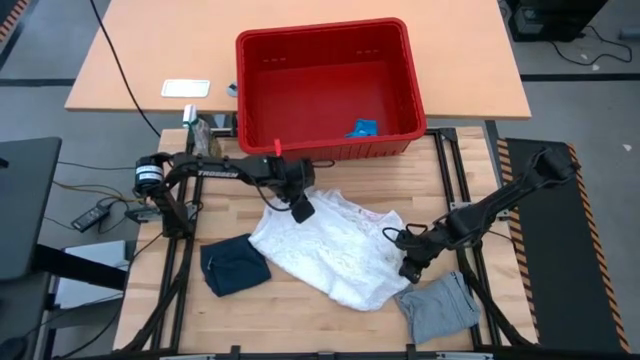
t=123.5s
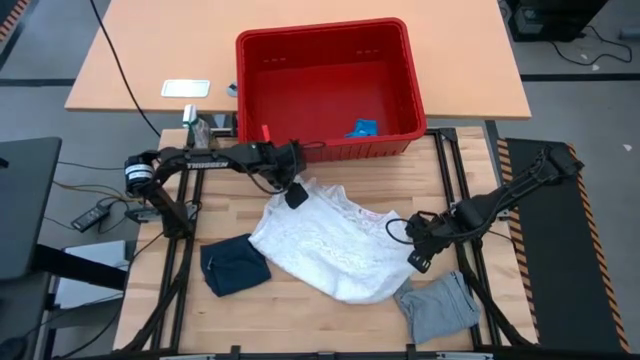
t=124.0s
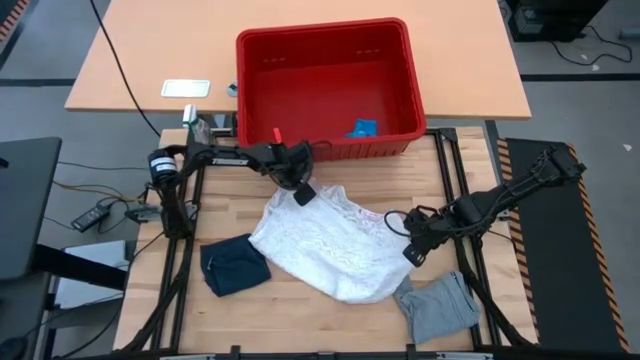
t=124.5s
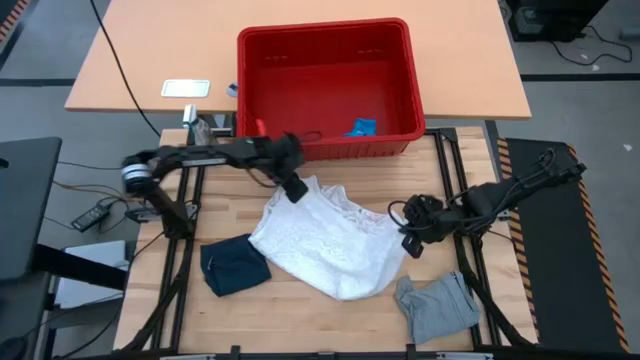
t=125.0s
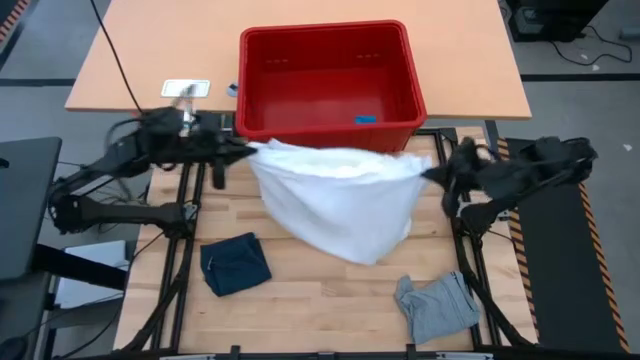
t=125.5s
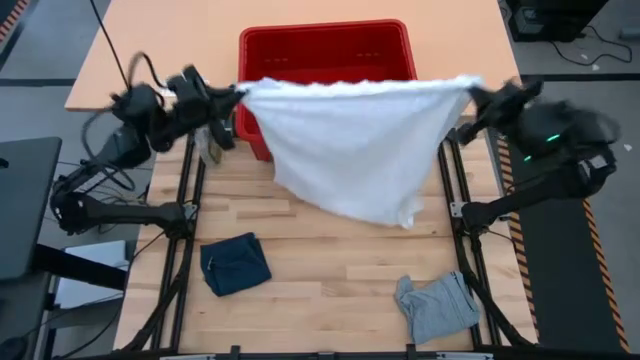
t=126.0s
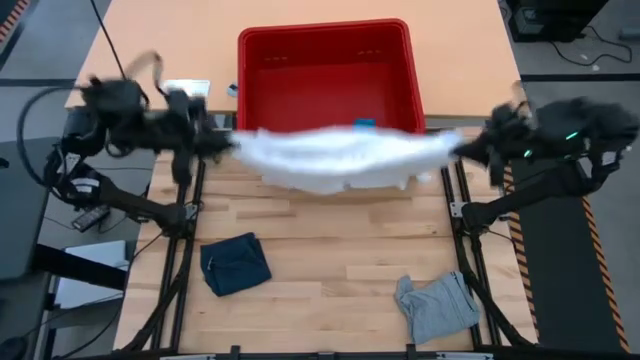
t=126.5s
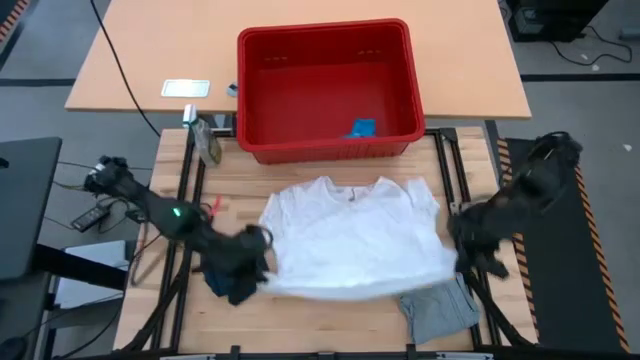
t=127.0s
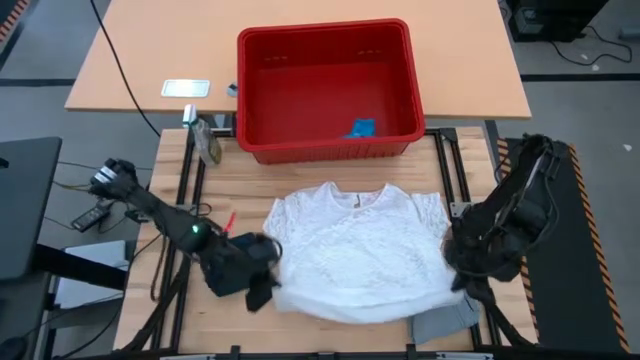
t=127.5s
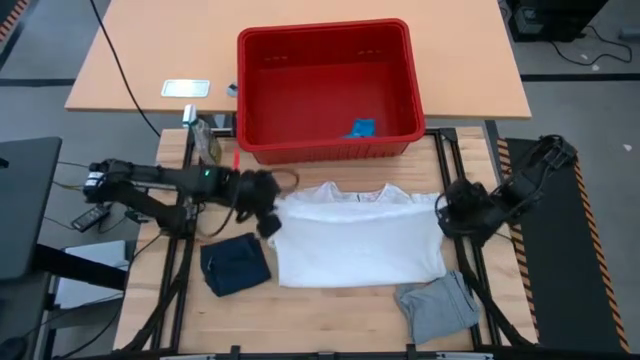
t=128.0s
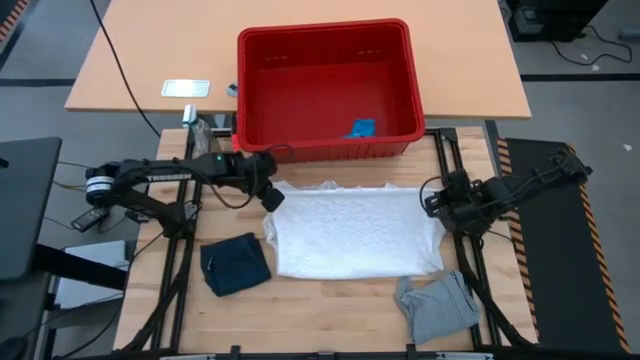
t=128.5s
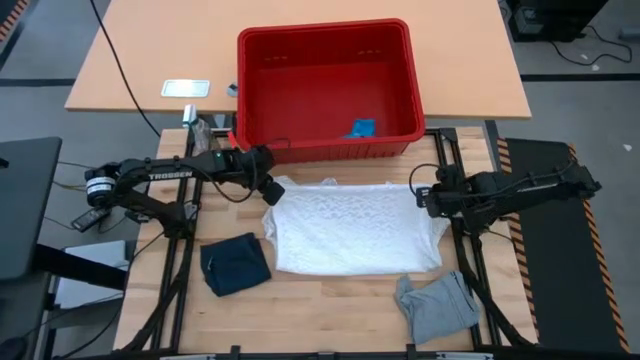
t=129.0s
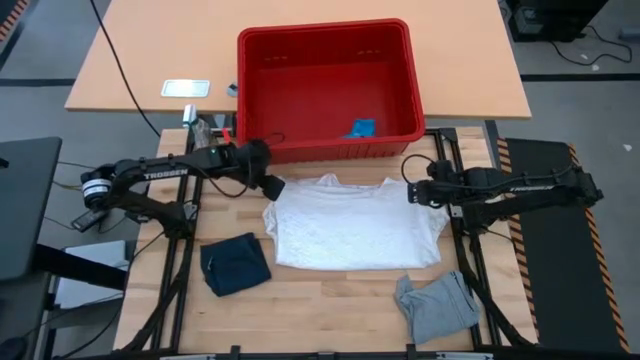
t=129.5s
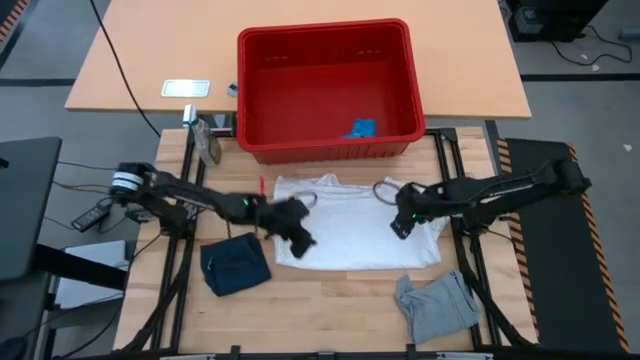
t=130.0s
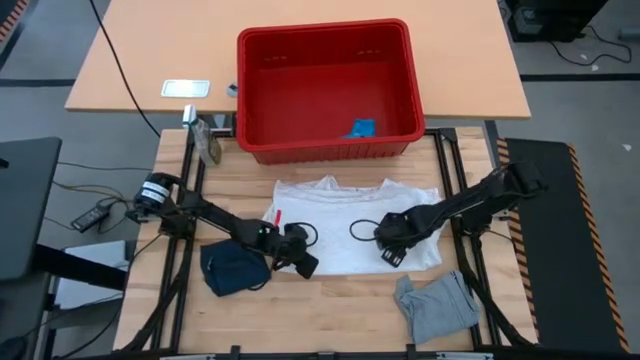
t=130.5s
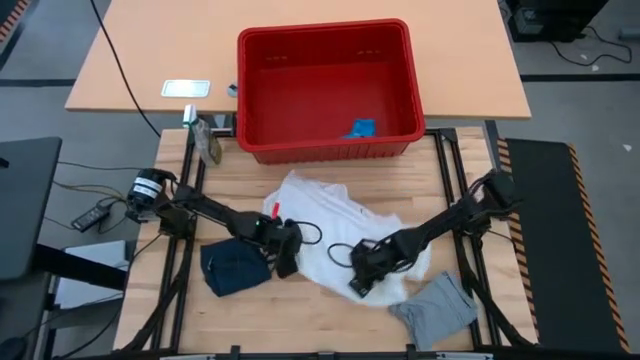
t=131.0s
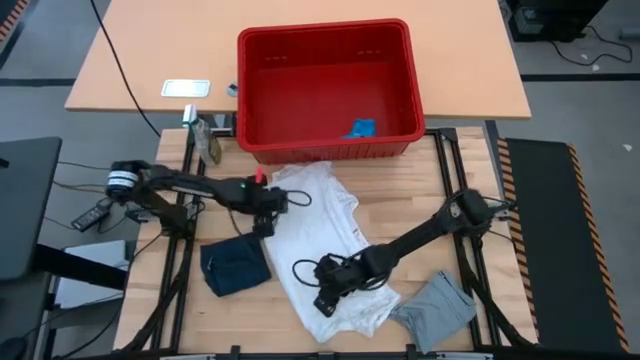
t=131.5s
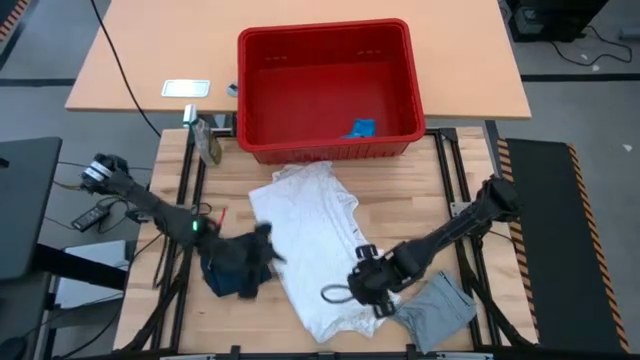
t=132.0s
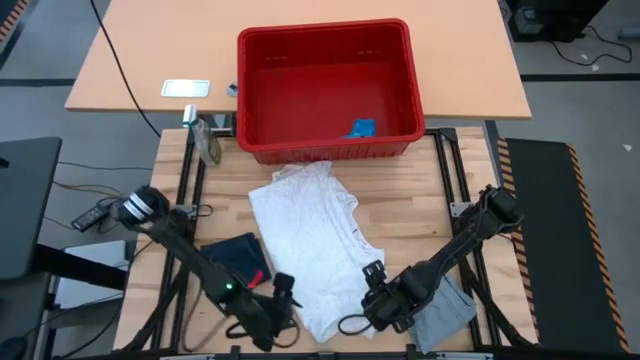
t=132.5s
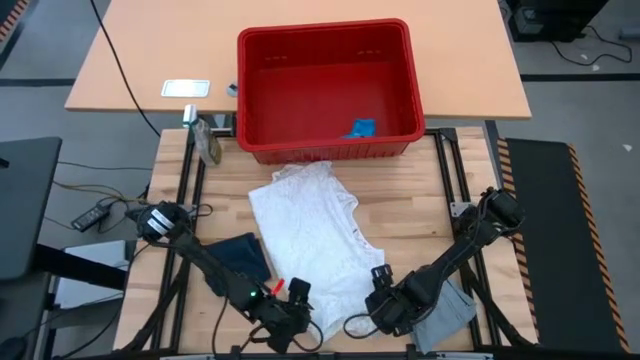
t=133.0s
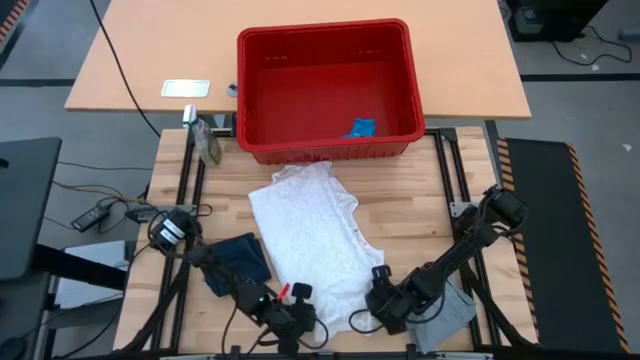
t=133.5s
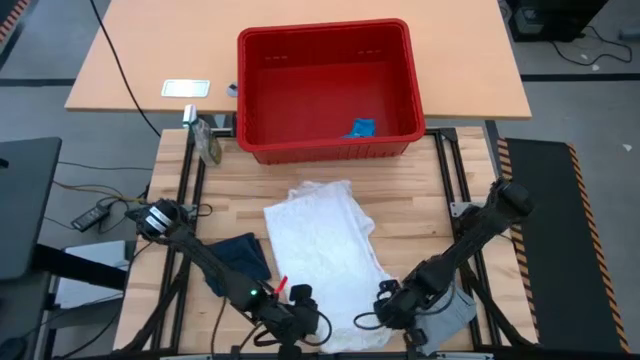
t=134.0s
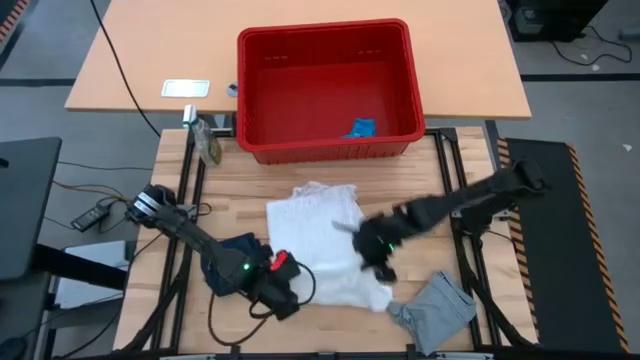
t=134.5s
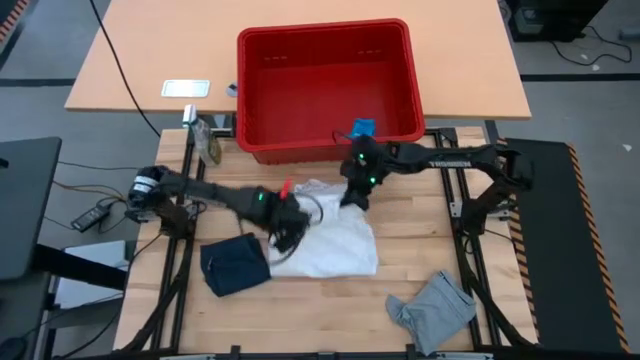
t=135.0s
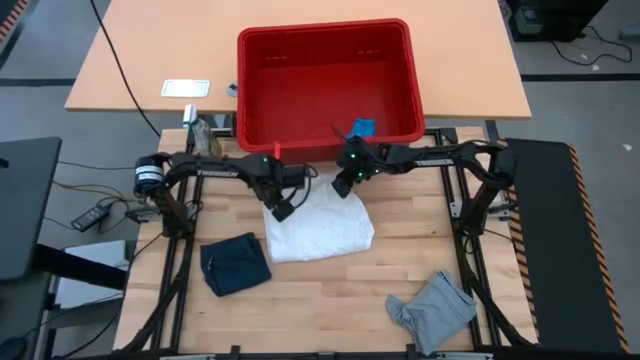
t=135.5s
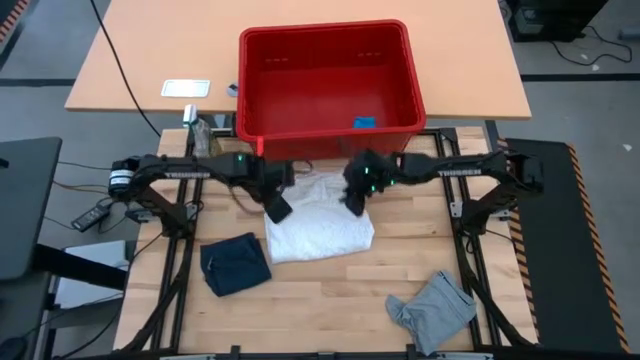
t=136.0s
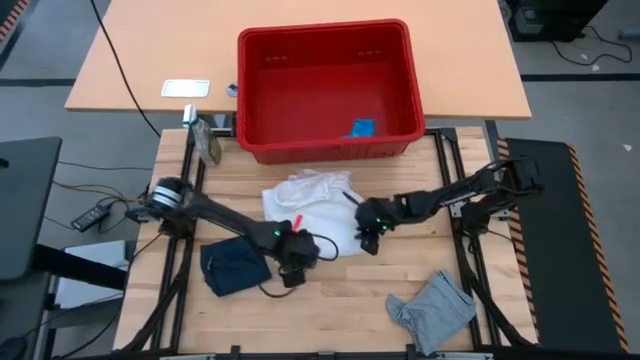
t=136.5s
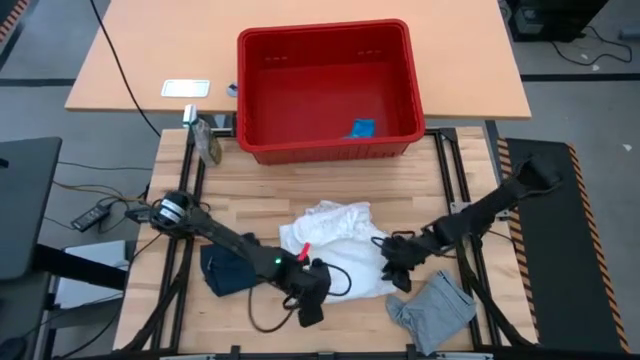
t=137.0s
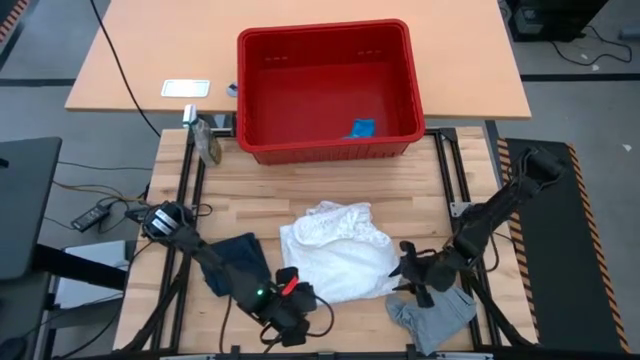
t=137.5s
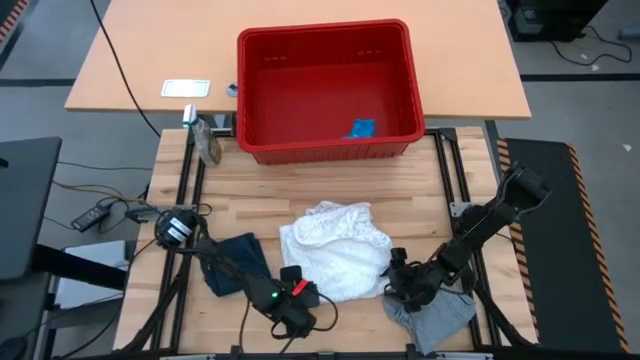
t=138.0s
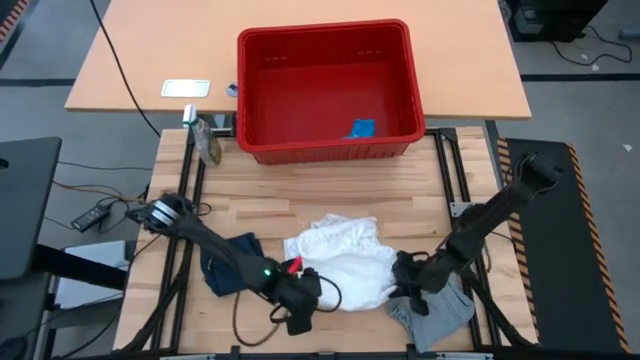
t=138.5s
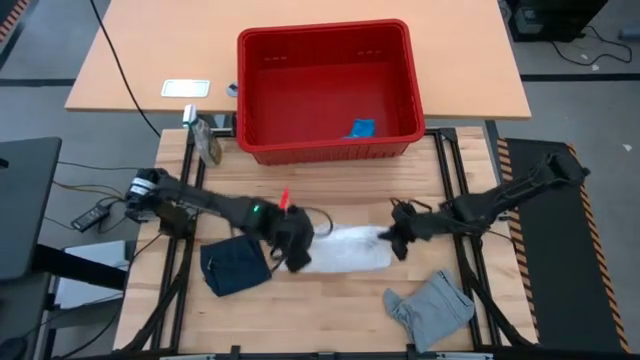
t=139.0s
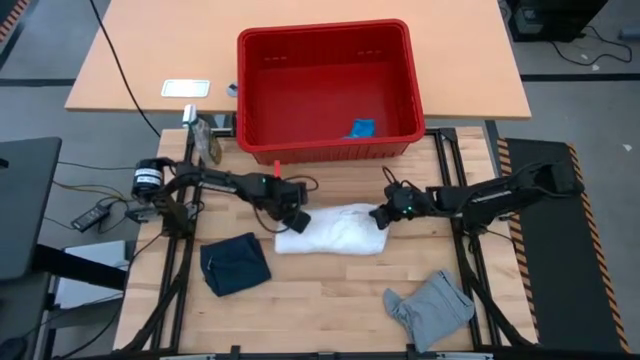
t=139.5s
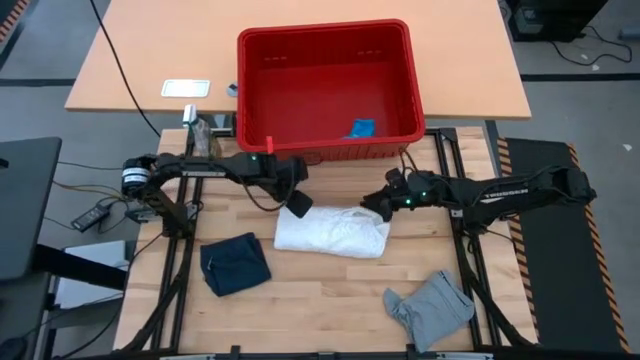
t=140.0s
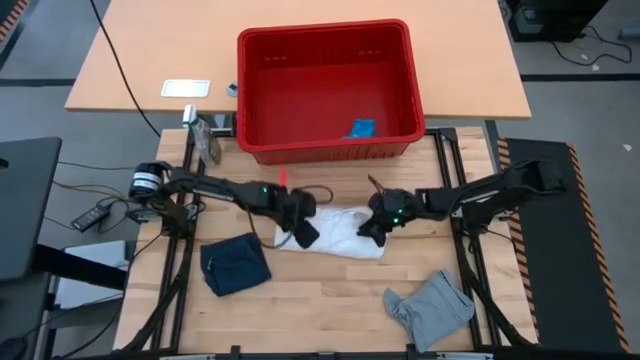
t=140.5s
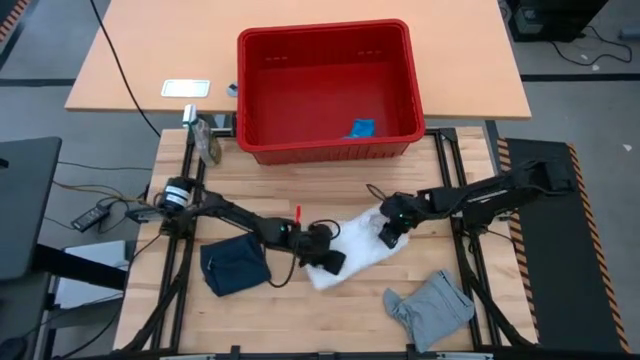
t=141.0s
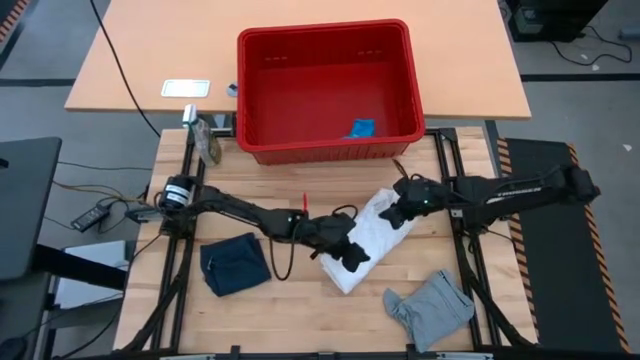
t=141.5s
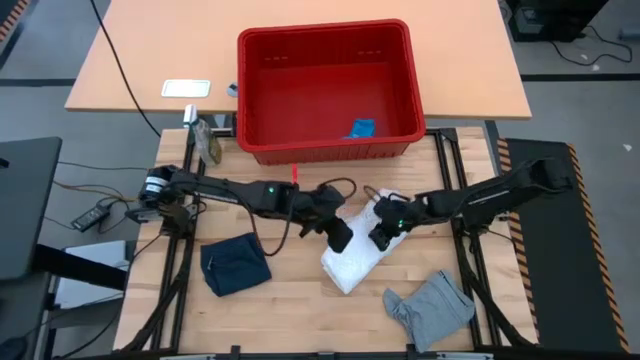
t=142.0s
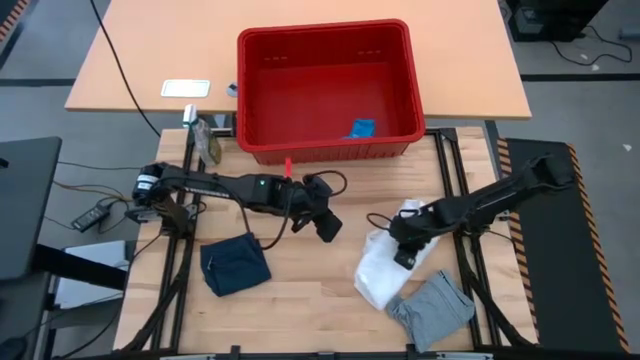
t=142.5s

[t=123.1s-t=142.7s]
Task: Fold laundry
Fold the white dress

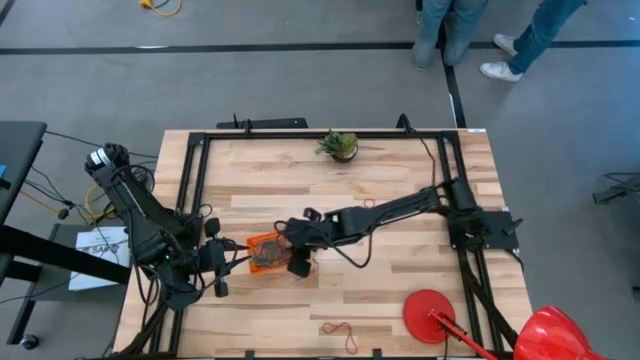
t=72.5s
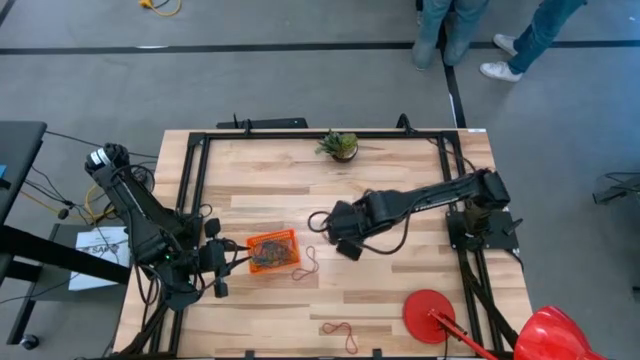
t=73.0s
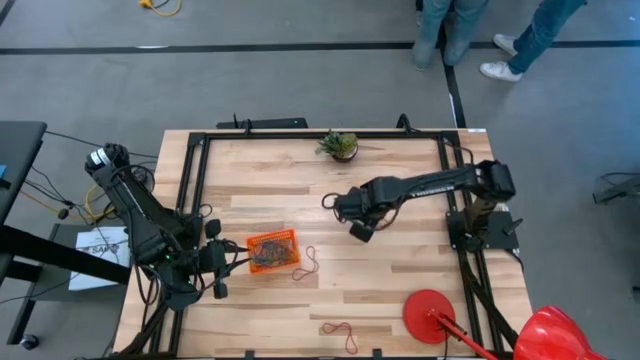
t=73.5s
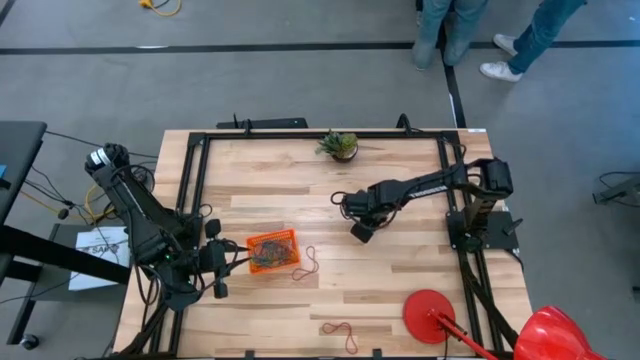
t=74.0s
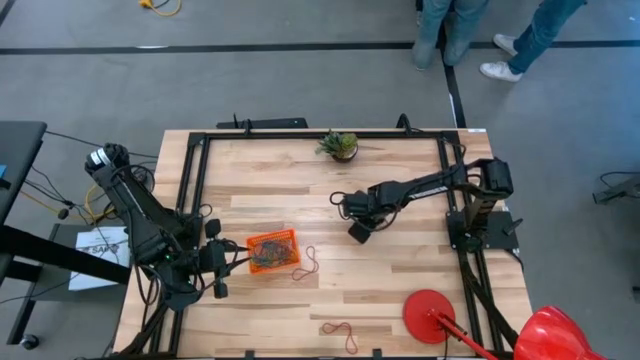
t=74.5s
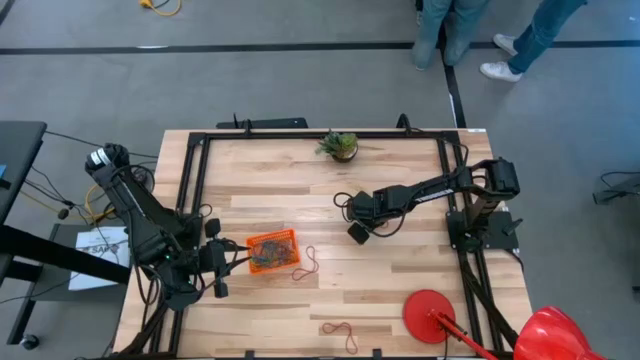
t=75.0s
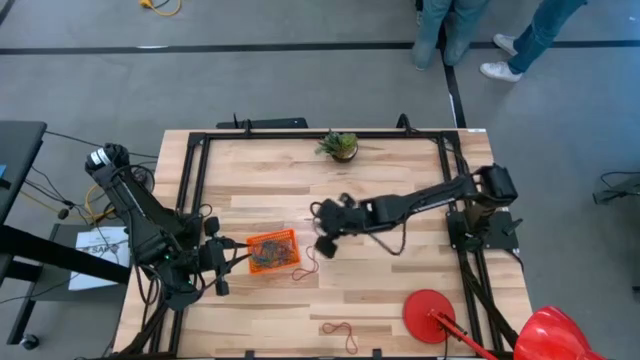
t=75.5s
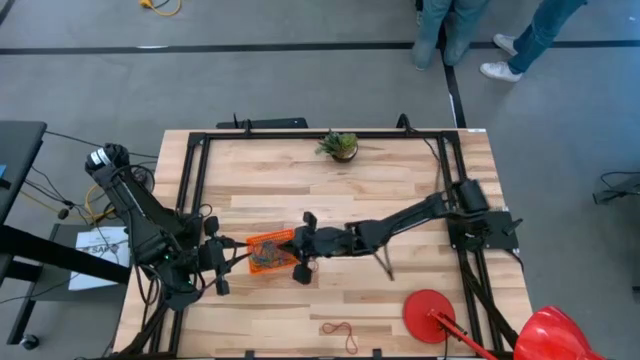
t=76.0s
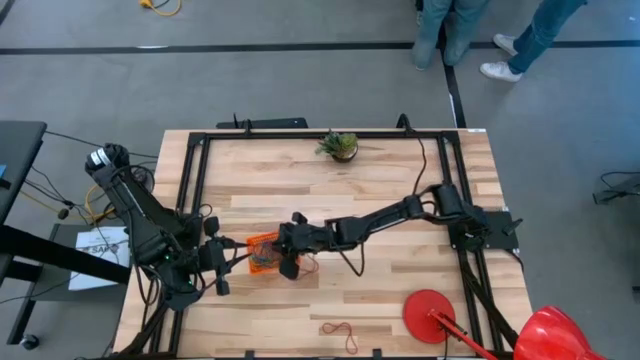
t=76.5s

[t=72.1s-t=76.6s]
Task: Pick and place rubber bands into bin
Put the top red rubber band into the orange container
